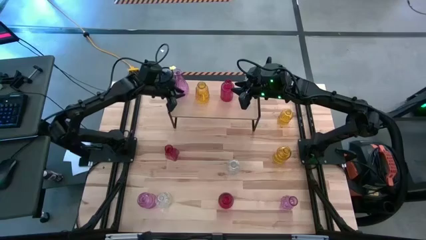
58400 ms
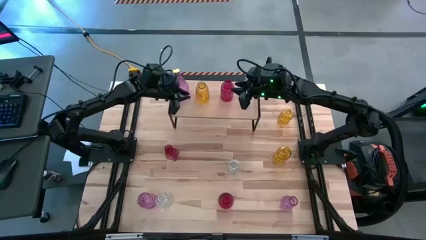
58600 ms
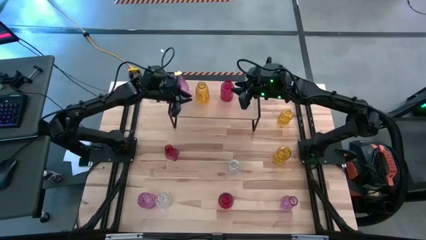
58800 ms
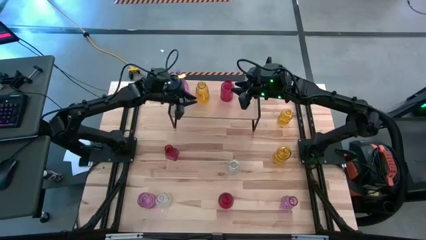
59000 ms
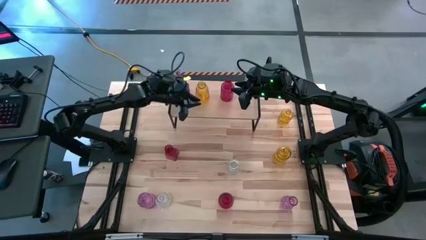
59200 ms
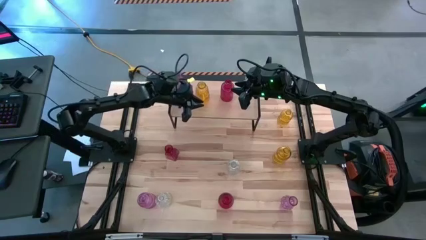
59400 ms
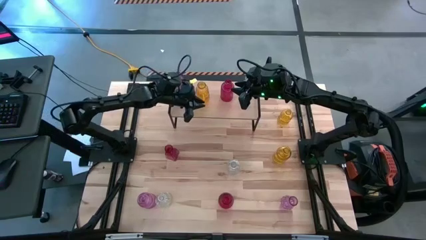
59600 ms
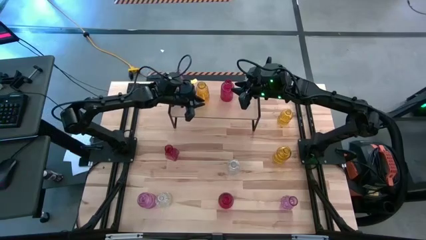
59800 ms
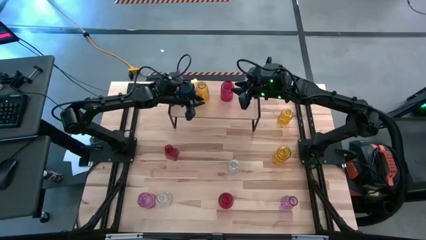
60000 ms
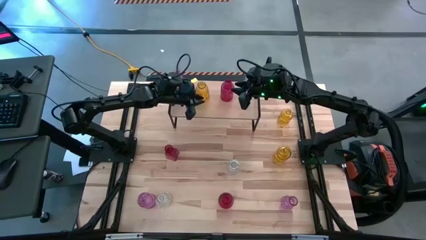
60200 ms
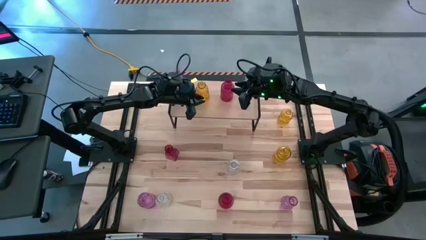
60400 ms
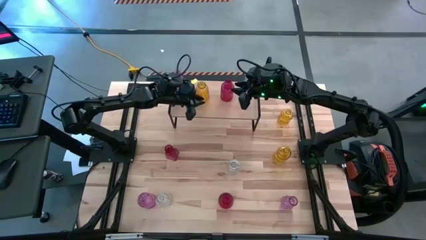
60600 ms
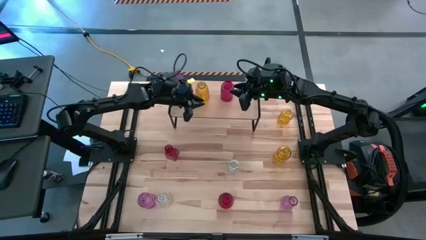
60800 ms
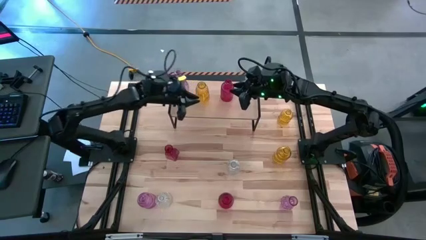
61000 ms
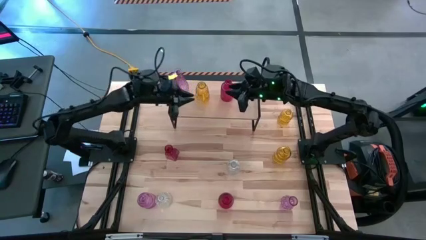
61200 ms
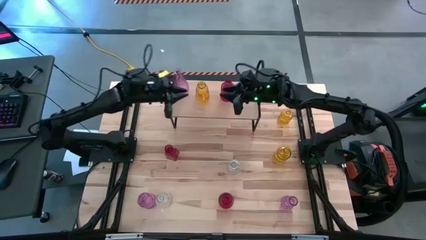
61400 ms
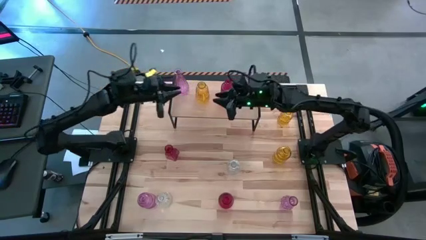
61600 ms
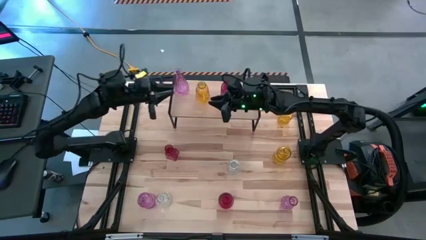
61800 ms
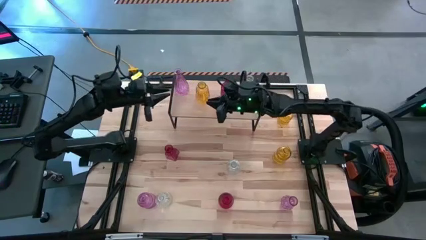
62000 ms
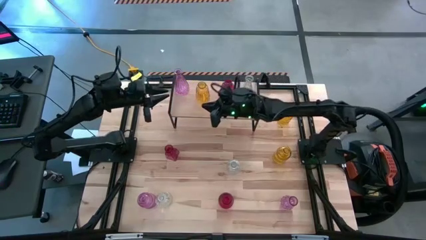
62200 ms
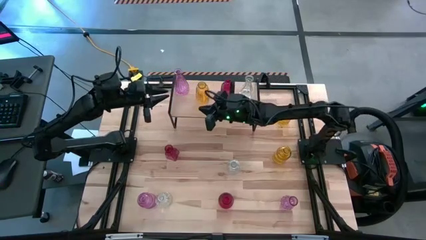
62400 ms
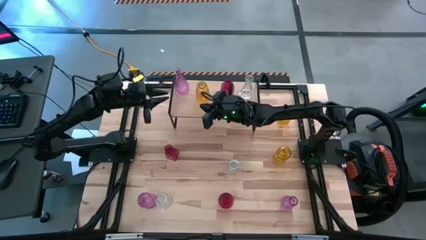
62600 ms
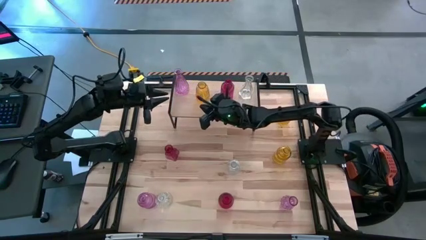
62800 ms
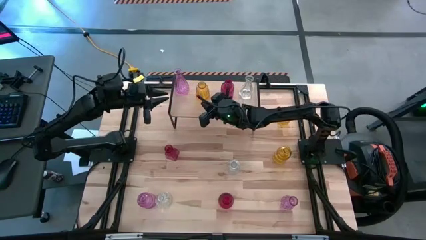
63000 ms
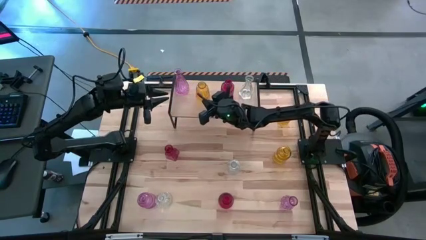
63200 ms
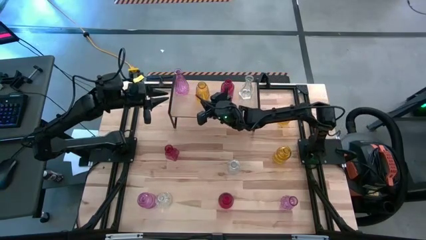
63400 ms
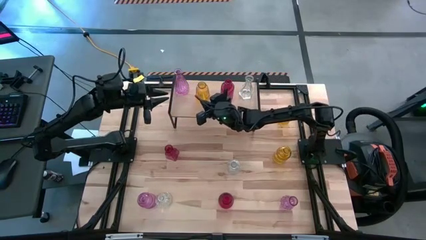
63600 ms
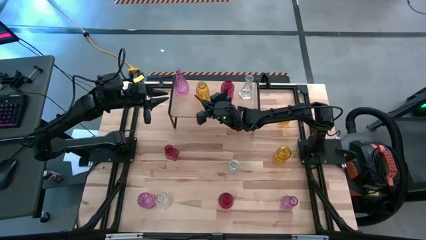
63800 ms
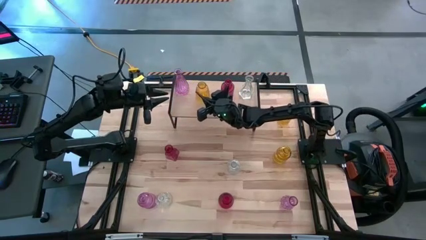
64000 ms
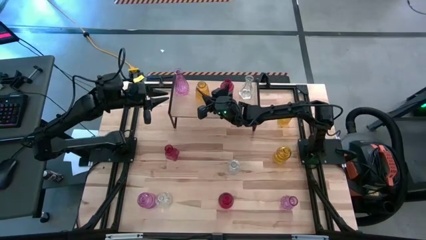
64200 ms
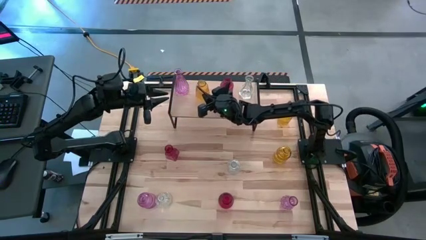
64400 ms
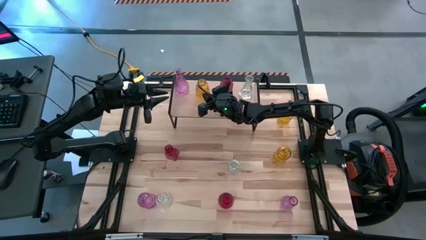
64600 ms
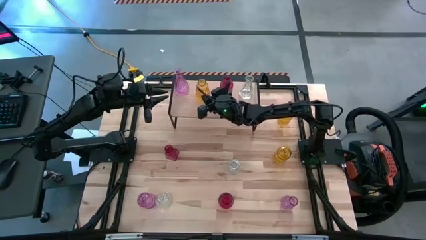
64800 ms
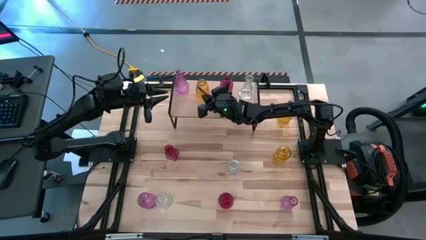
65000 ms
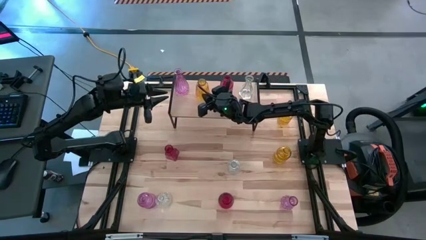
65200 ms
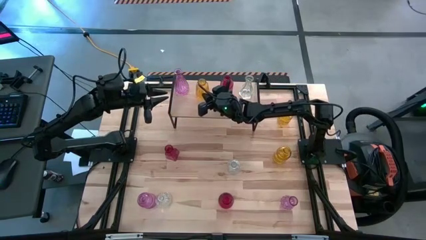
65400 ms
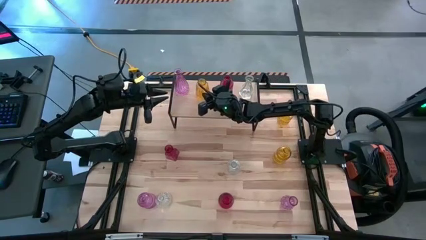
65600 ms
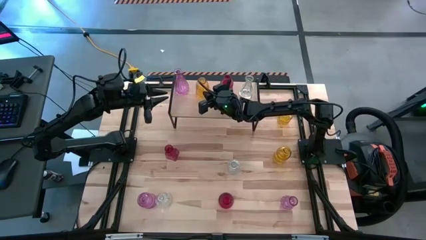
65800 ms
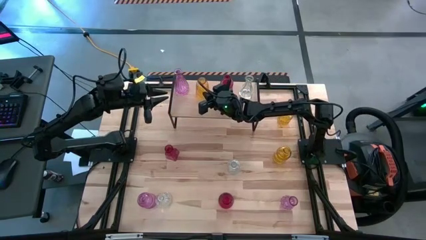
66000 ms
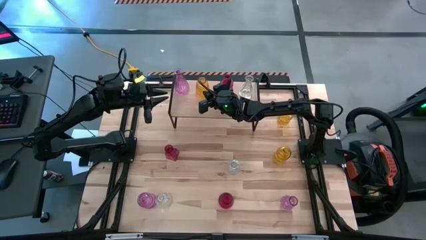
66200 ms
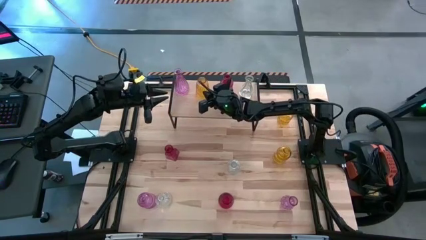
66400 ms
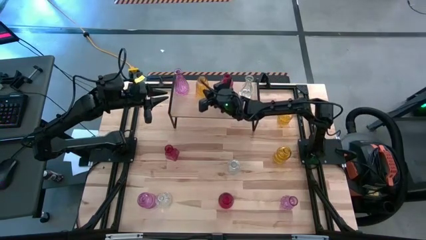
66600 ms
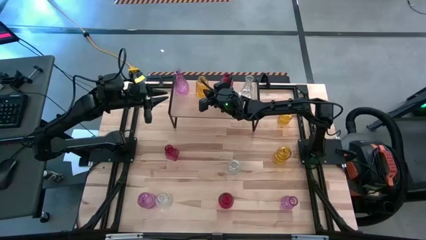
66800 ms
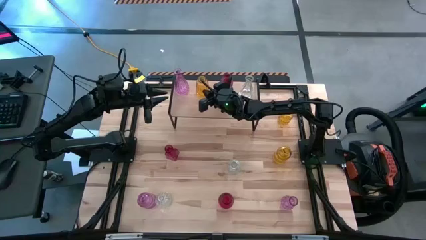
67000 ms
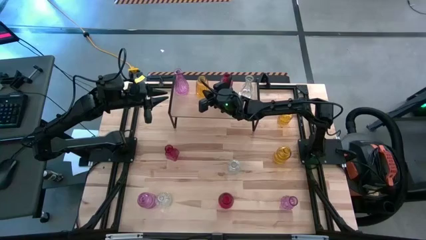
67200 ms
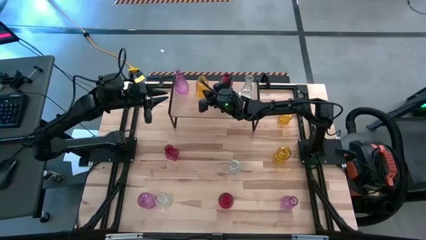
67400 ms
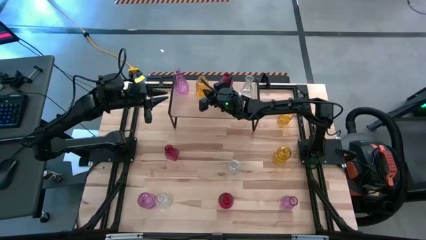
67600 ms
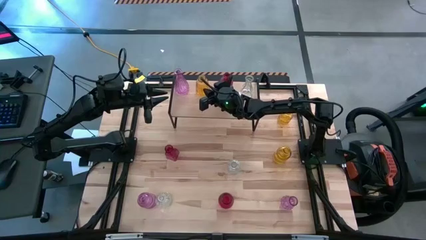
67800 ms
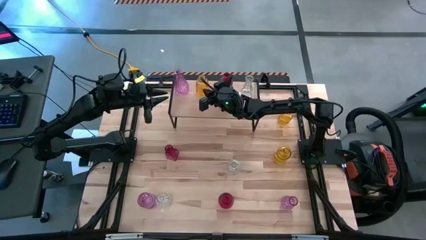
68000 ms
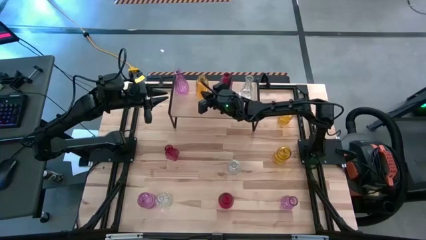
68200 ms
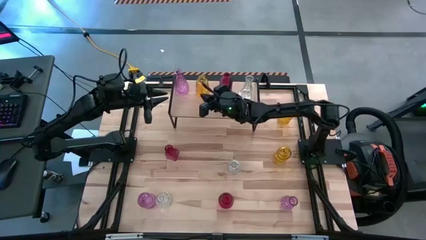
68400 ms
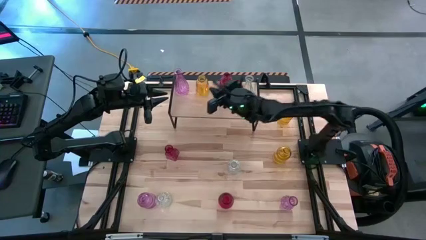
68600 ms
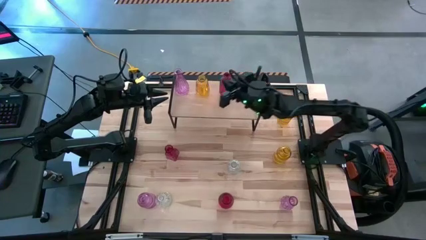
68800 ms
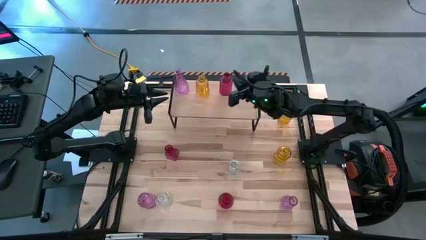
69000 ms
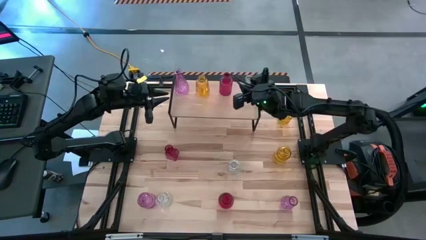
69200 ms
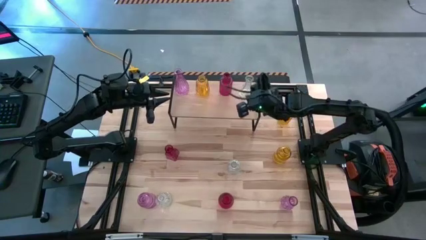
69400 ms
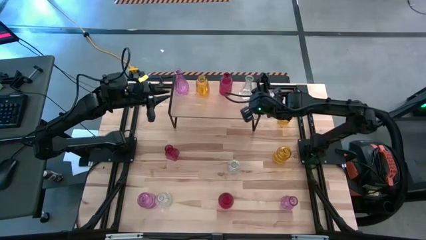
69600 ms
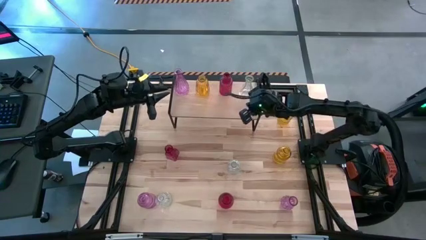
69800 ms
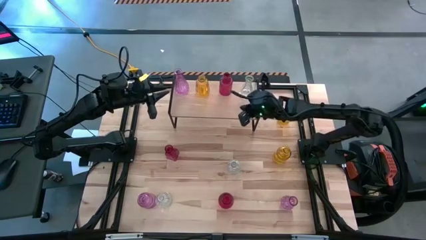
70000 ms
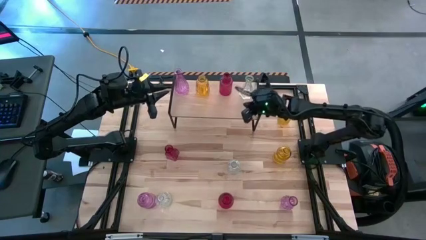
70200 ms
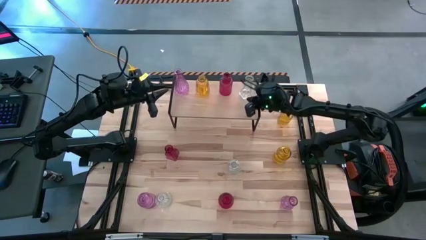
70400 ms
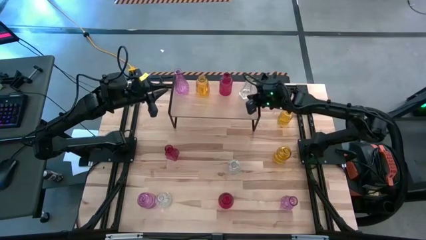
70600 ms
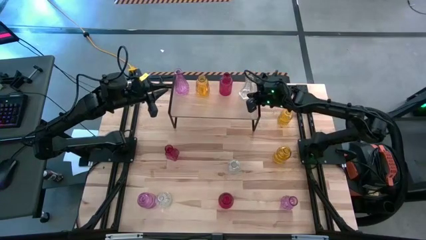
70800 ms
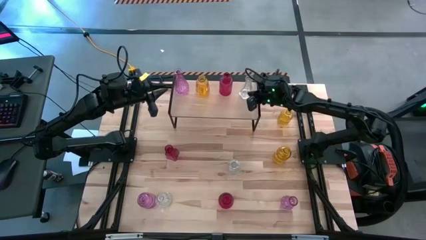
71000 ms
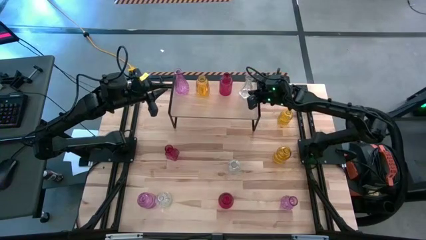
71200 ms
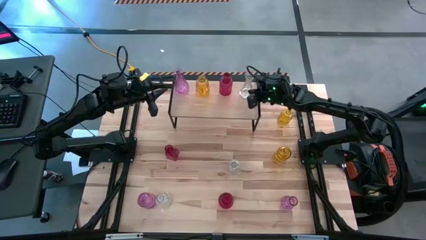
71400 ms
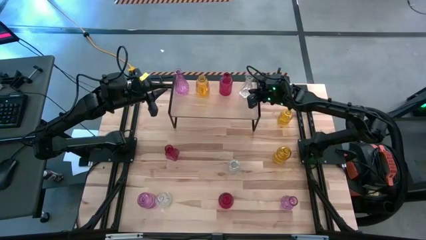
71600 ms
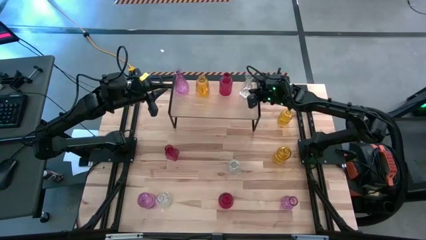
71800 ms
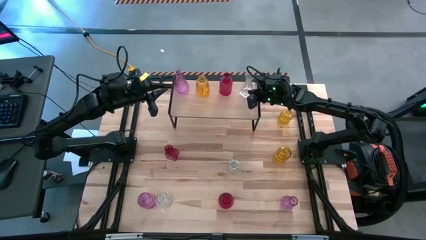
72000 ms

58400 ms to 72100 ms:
Task: sort vases onto shelf
Adjust the vases on the shelf

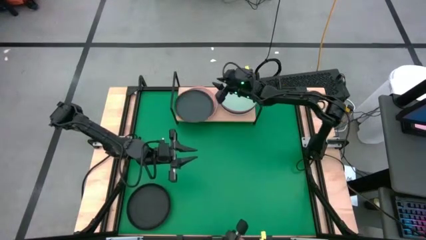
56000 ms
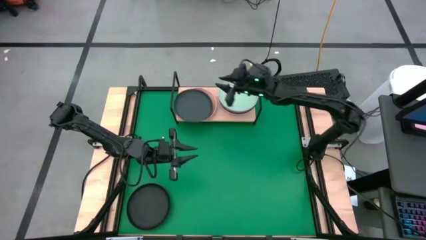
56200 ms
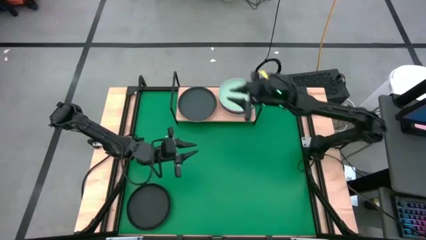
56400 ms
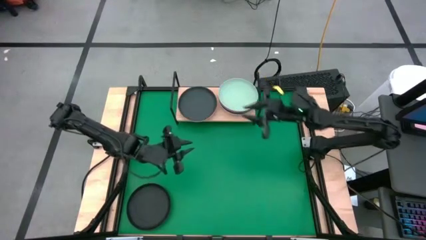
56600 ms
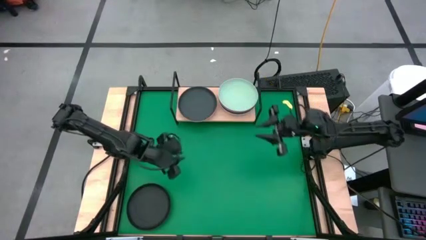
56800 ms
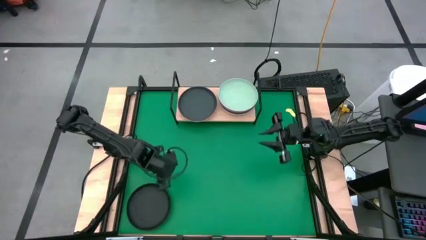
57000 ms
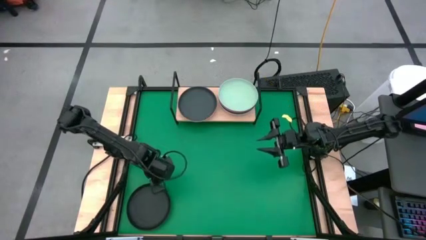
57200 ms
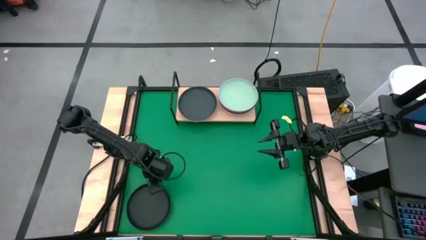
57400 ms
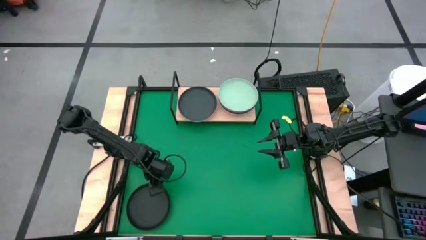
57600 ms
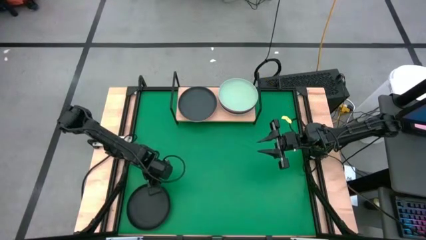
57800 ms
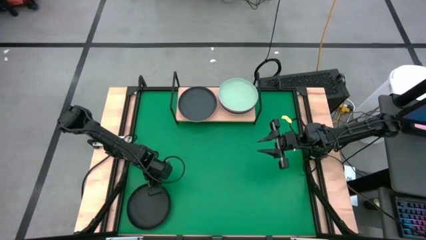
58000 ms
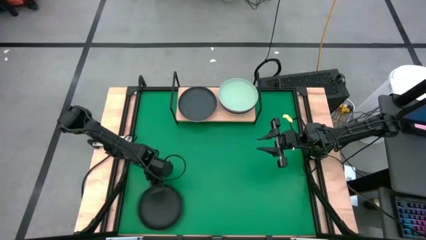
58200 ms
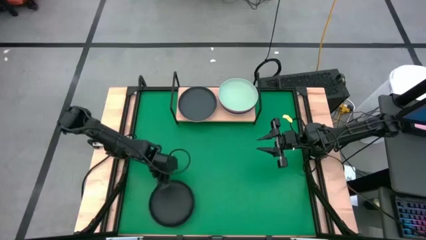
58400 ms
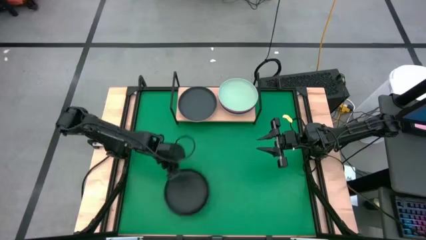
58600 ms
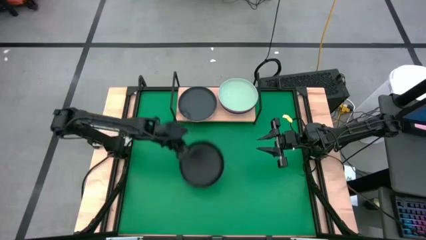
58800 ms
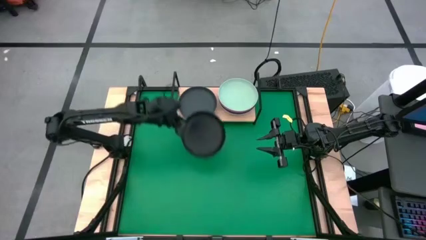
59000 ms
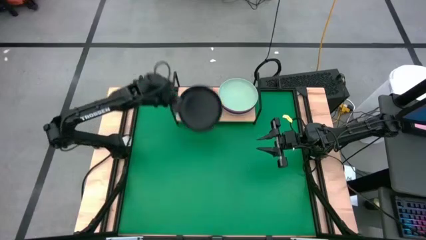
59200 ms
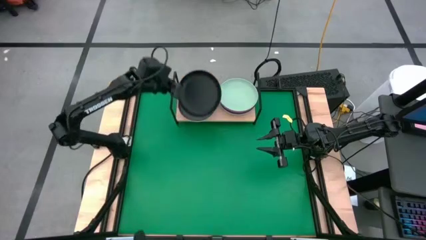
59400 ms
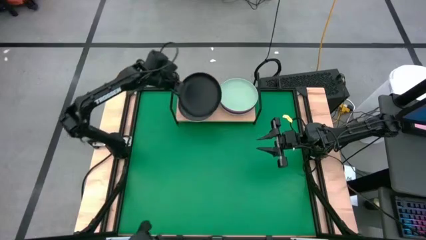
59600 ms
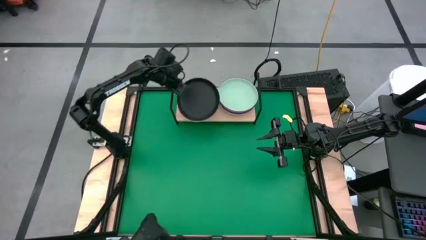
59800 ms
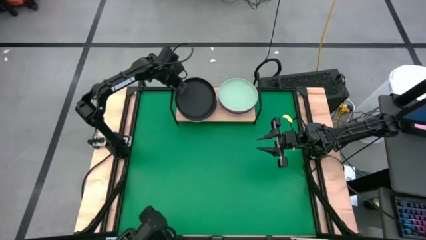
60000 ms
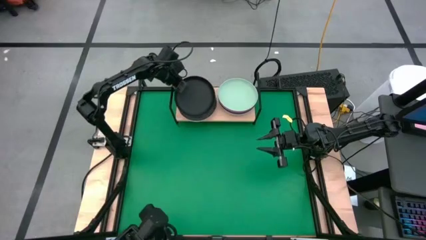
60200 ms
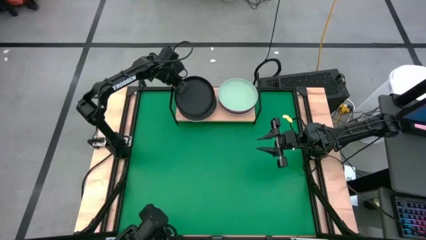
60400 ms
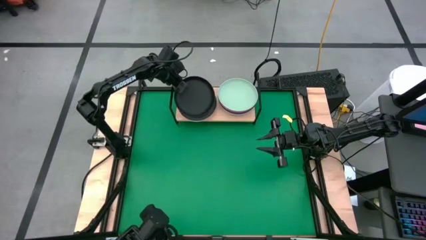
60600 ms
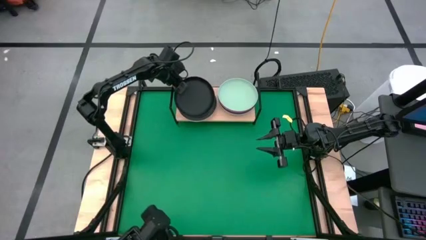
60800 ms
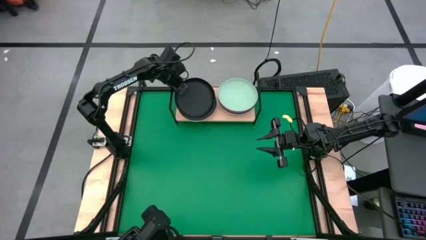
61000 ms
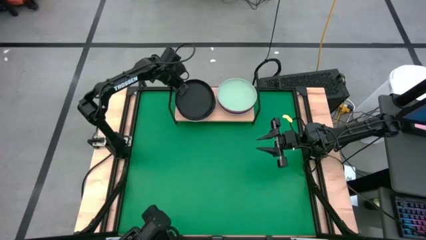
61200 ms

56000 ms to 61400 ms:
Task: Place and stack plates onto a shelf
Stack the black plate on top of the black plate on the shelf
